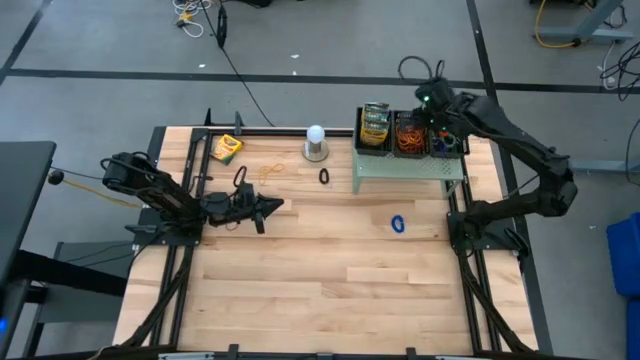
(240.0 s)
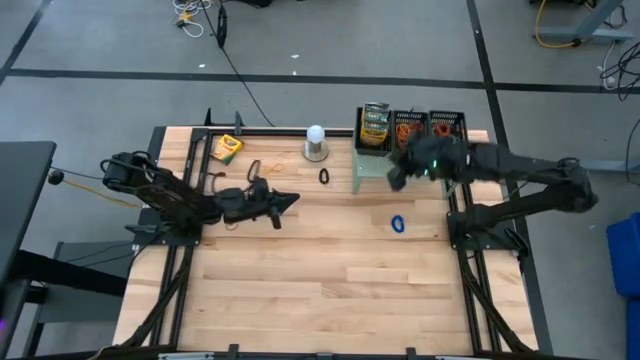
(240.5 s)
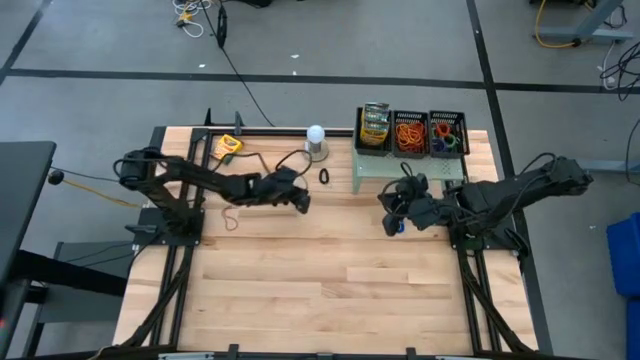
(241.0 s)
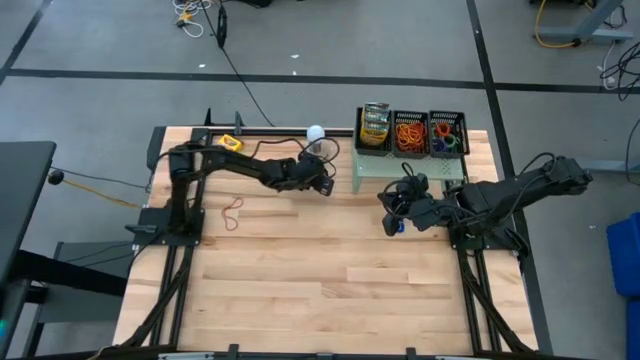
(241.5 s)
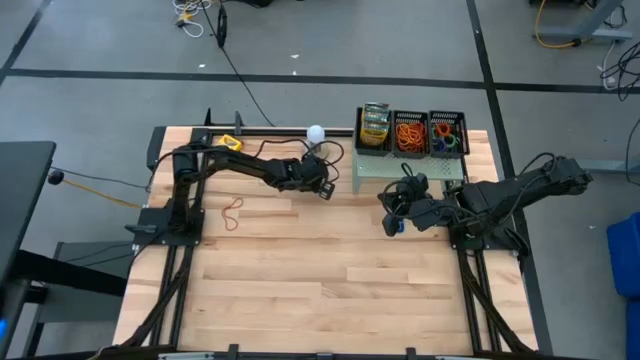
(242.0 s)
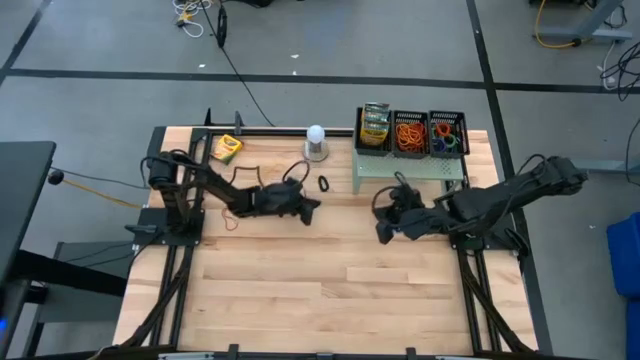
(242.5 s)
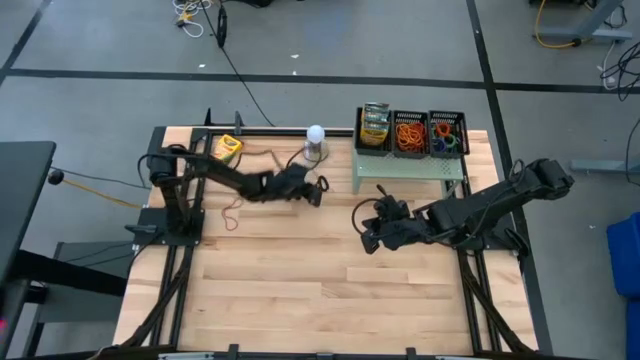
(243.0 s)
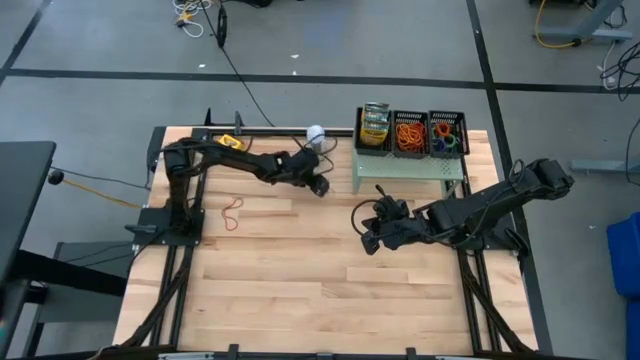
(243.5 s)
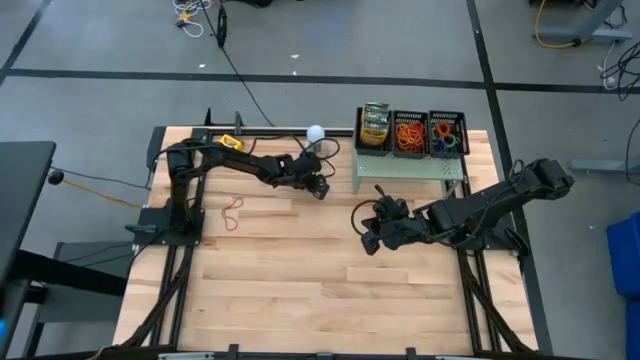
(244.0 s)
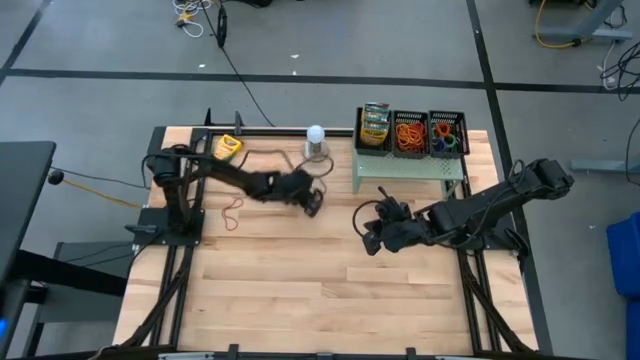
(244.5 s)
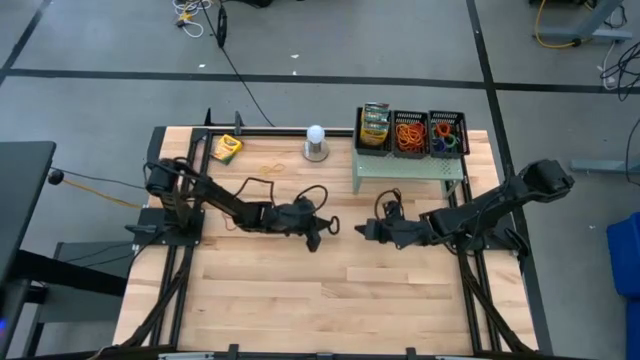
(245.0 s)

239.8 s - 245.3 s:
Task: Pick & Place Office Desk Supplies
Put the black spring keychain into the right basket on the shelf

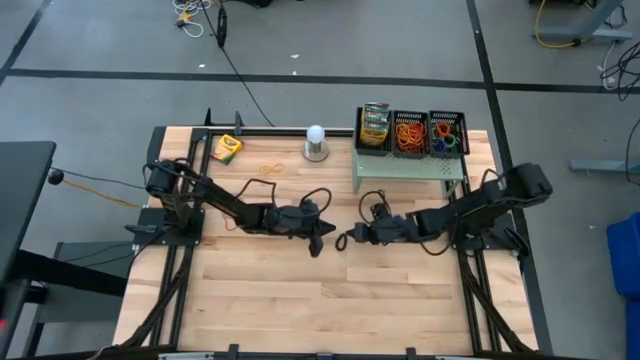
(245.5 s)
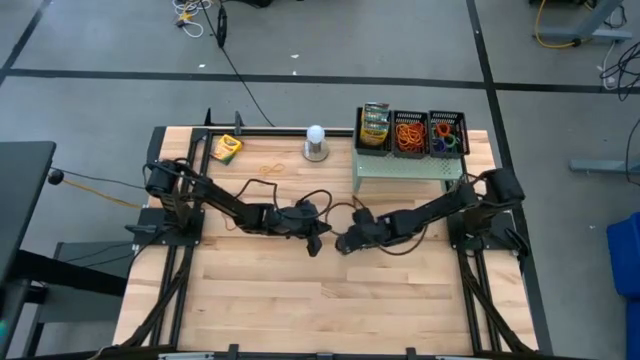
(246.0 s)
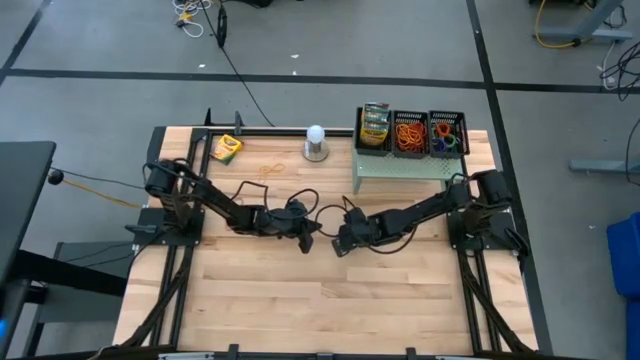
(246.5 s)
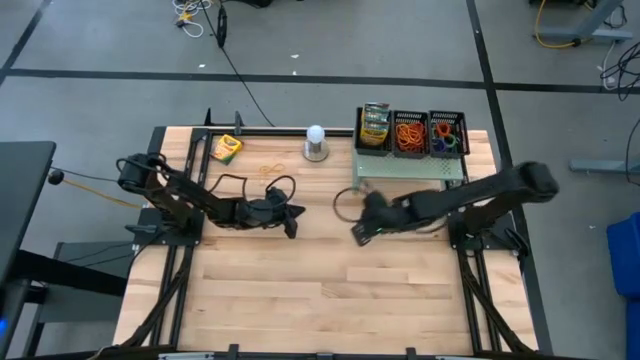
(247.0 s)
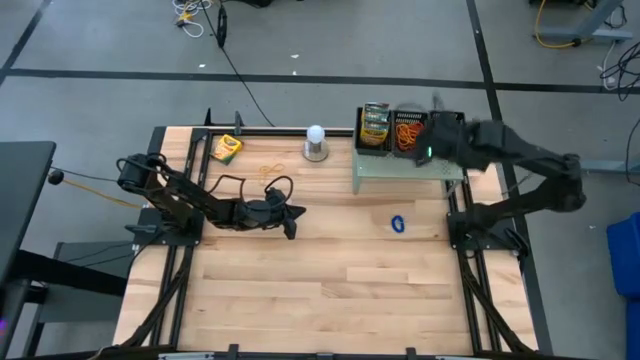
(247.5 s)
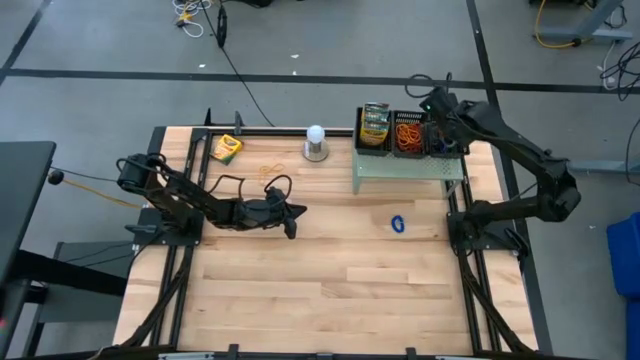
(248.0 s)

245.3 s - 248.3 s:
Put the black spring keychain into the right basket on the shelf

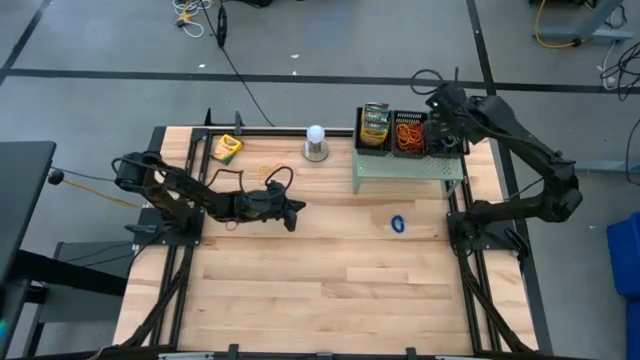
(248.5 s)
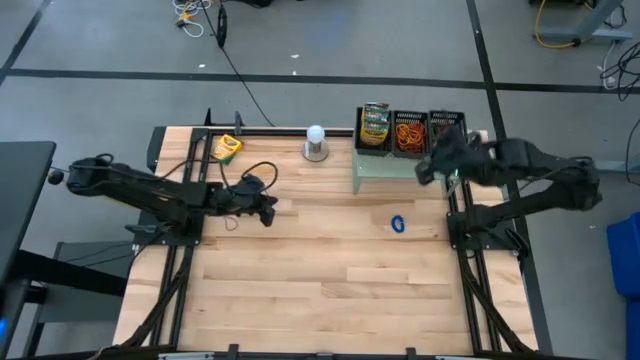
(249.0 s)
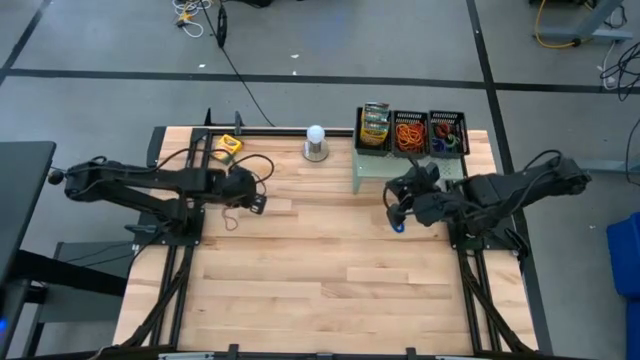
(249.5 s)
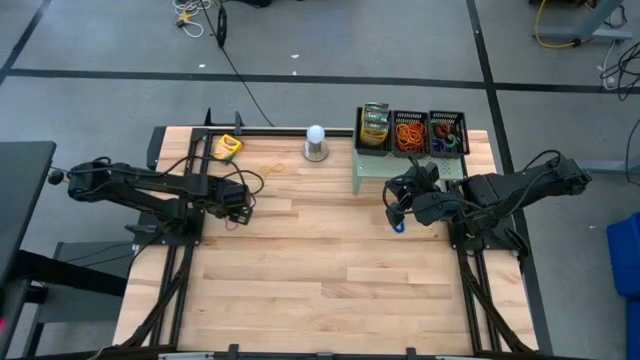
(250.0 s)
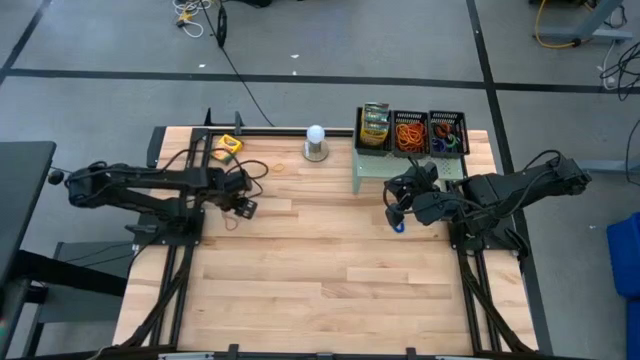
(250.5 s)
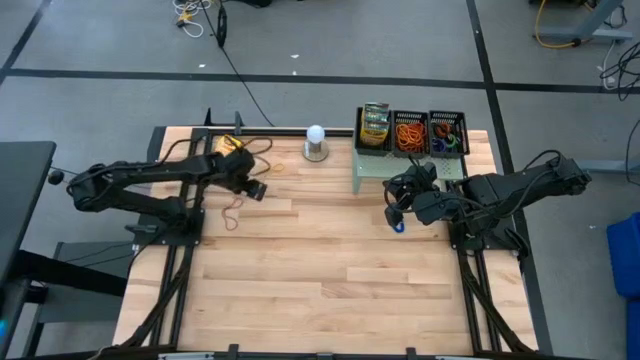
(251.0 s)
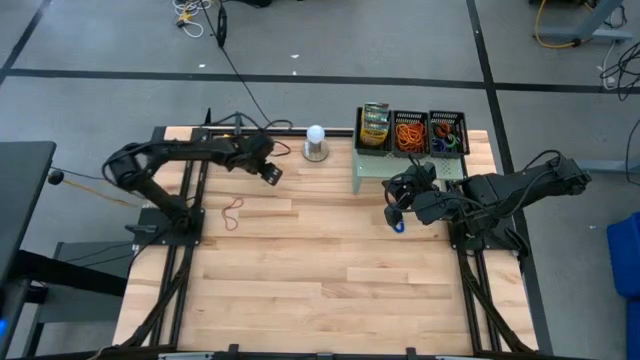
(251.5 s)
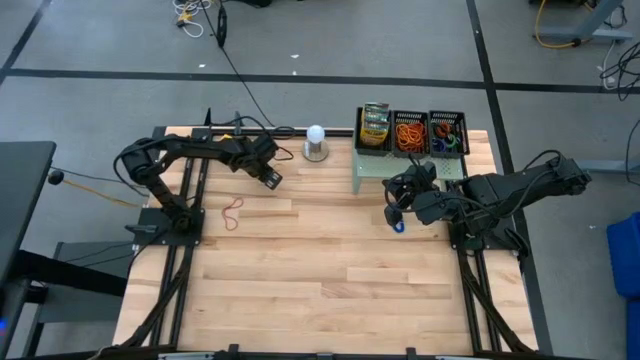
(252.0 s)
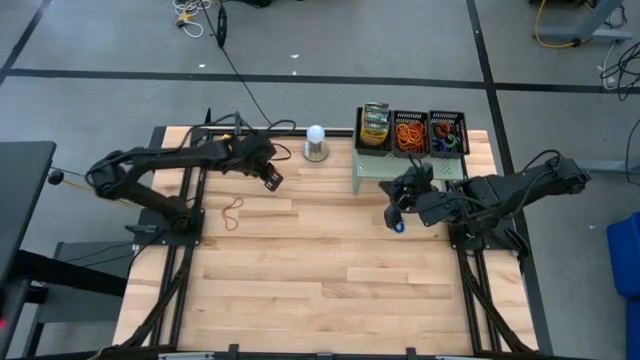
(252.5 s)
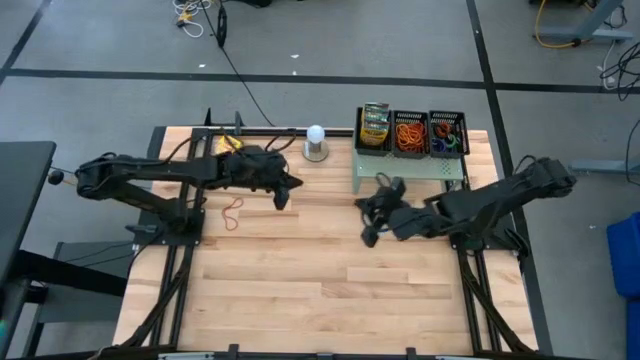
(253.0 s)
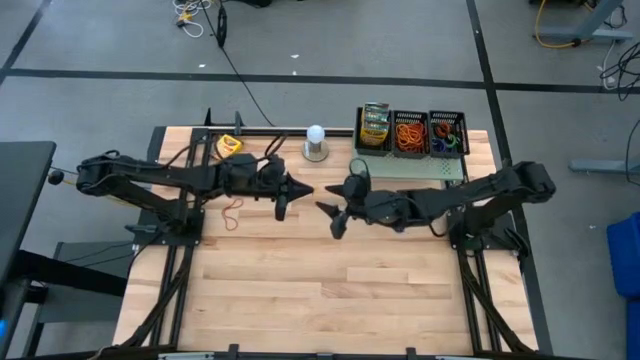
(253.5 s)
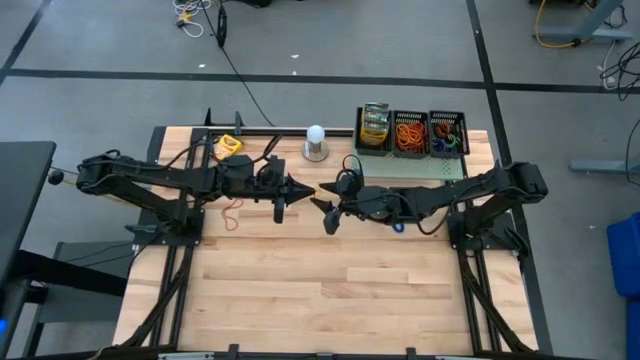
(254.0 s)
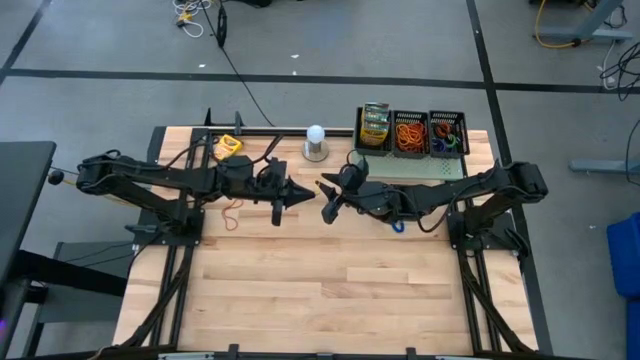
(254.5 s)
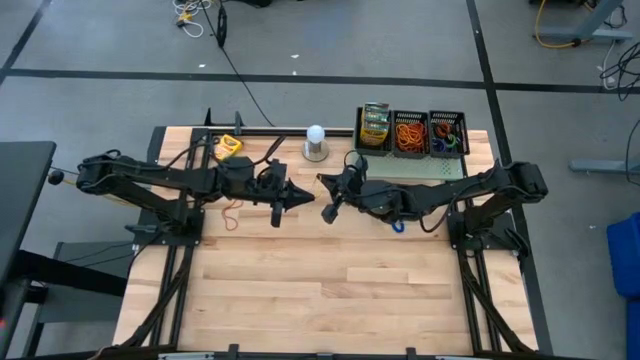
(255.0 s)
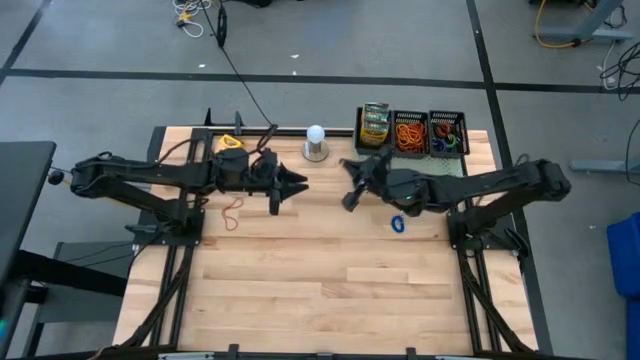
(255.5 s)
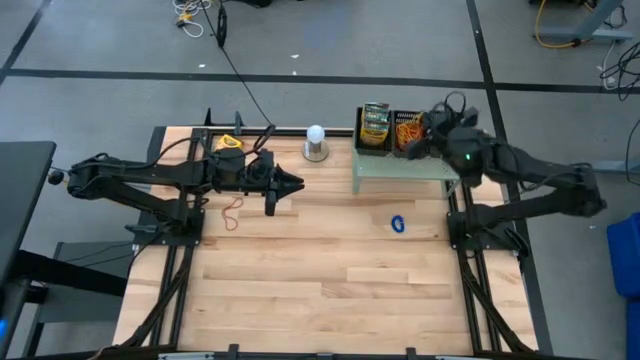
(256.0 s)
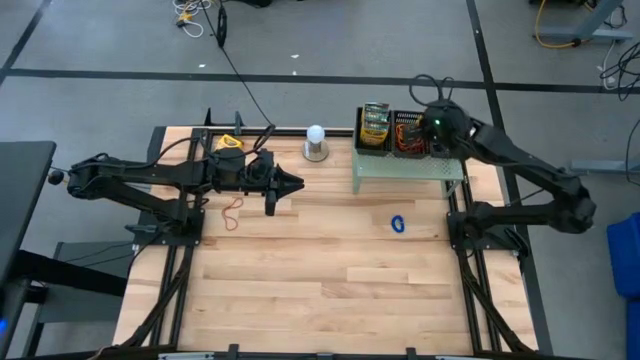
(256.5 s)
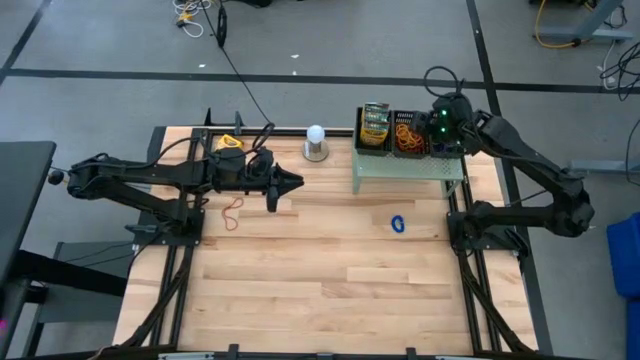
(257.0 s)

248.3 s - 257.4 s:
Put the yellow rubber band into the middle basket on the shelf

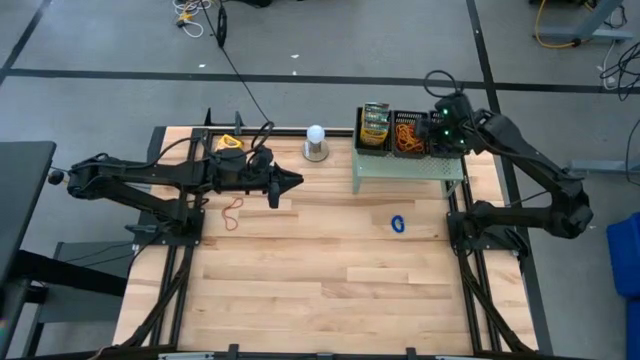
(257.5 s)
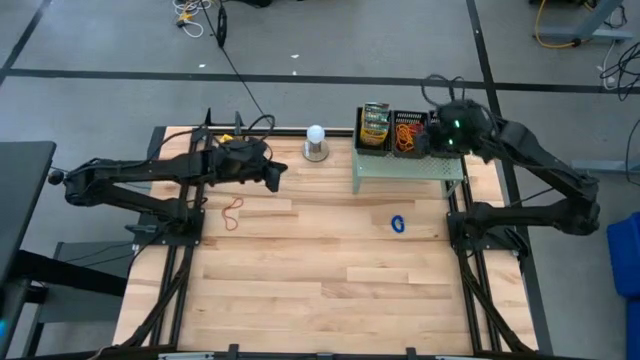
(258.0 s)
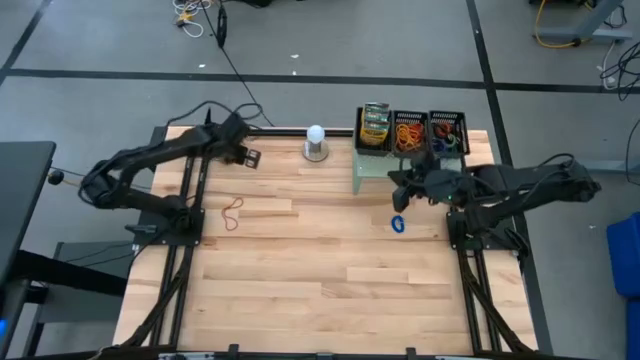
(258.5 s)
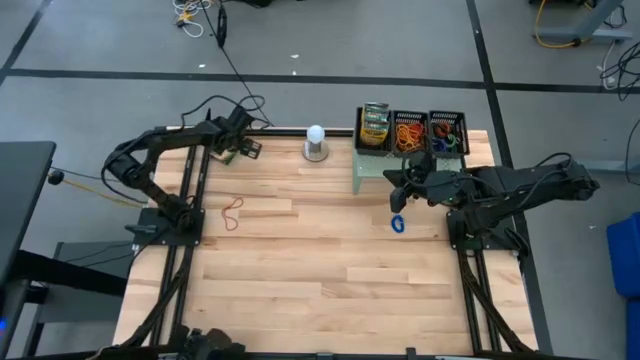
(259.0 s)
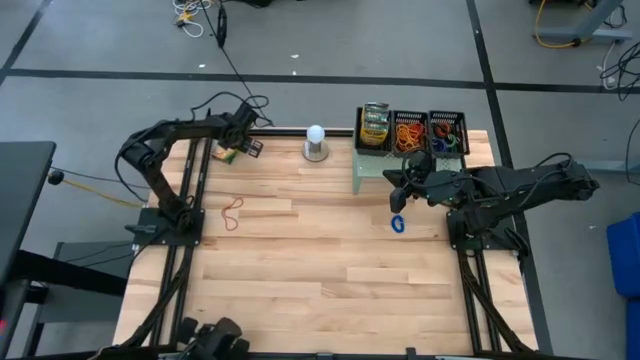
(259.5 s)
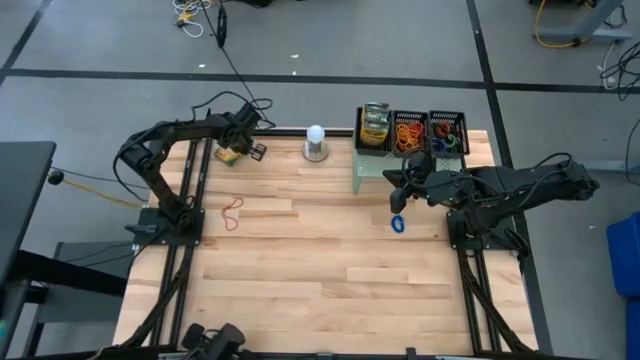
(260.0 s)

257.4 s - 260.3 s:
Put the crayon box into the left basket on the shelf

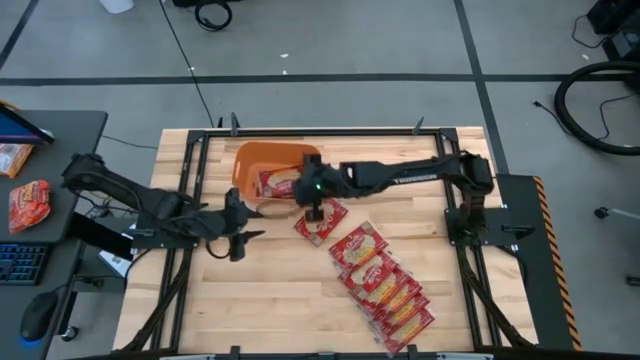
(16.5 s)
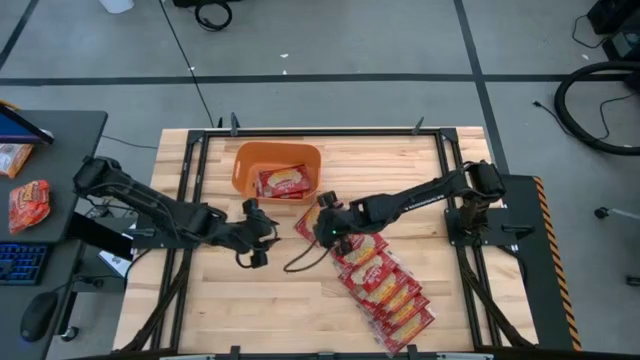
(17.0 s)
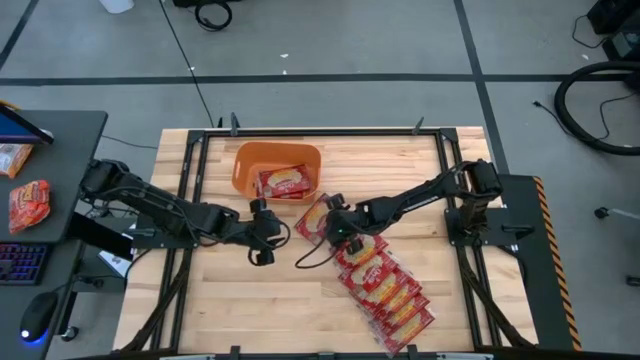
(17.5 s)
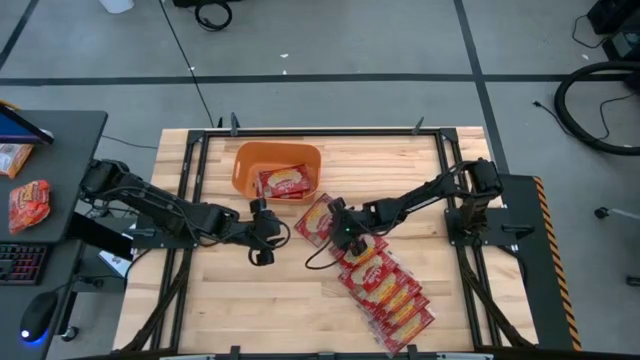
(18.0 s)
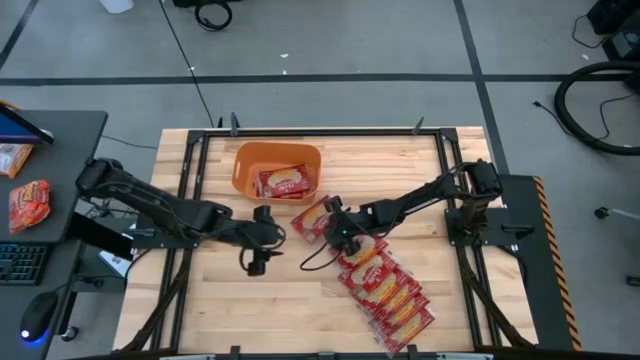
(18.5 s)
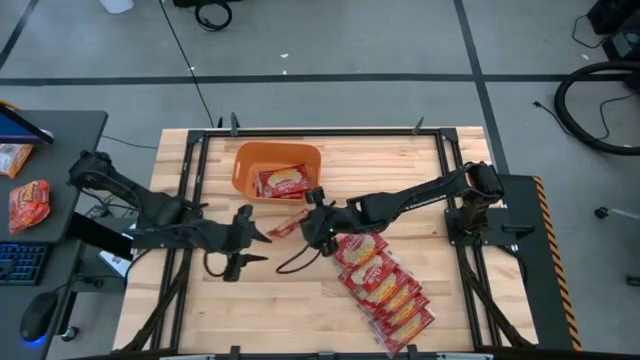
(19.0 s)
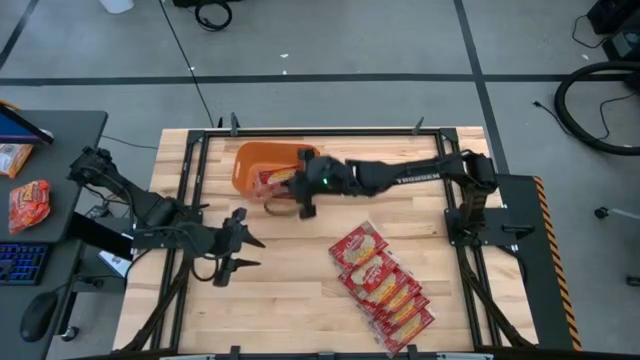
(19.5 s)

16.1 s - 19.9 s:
Task: Sort popcorn bags into baskets
Put the popcorn bag into the orange bin
